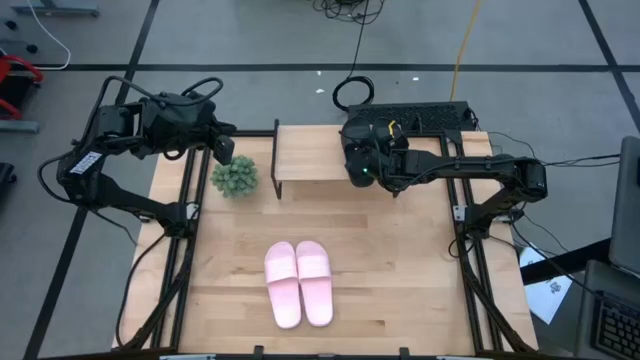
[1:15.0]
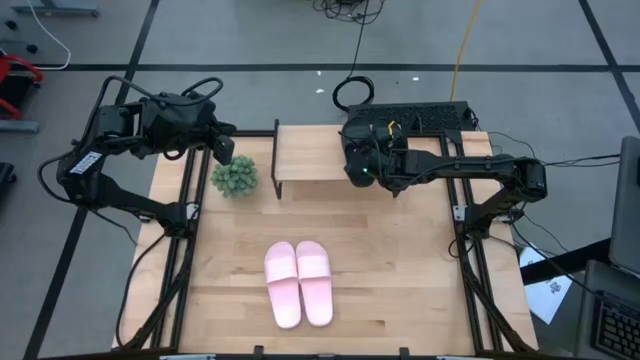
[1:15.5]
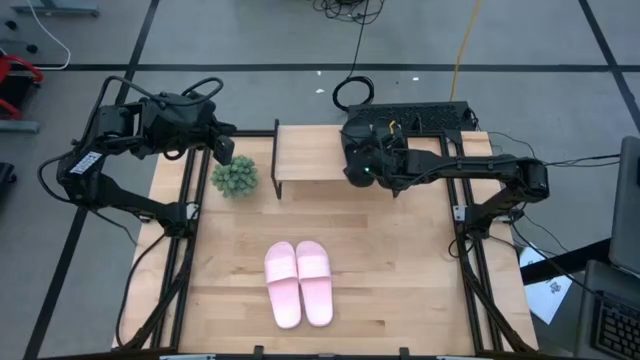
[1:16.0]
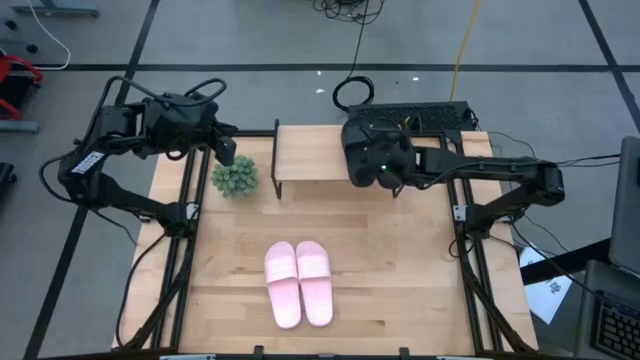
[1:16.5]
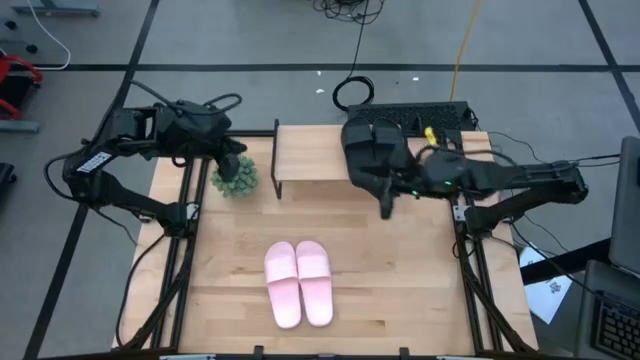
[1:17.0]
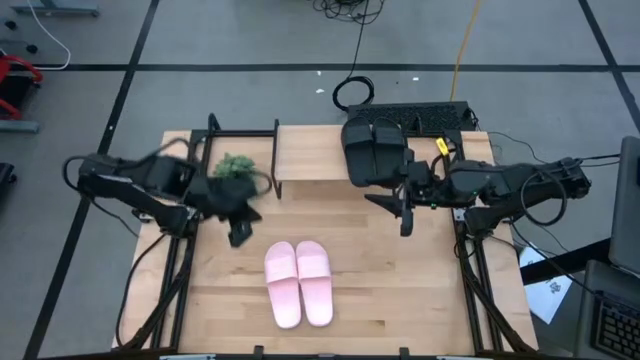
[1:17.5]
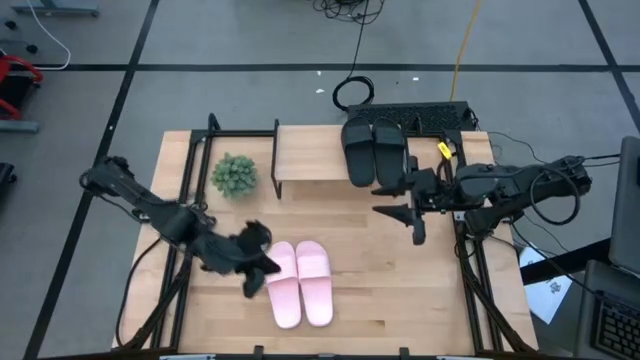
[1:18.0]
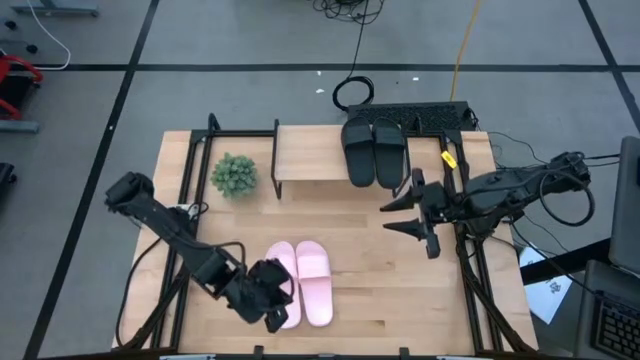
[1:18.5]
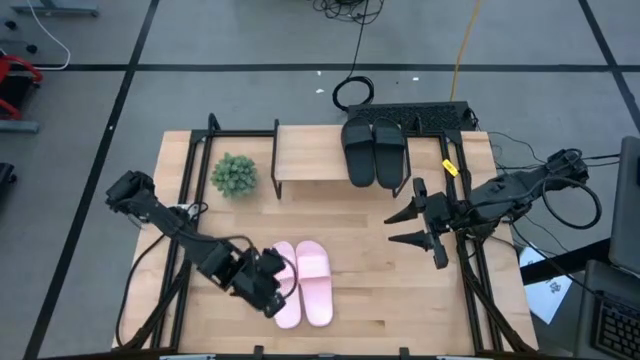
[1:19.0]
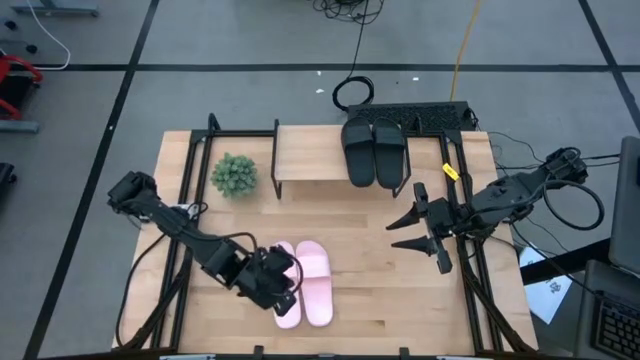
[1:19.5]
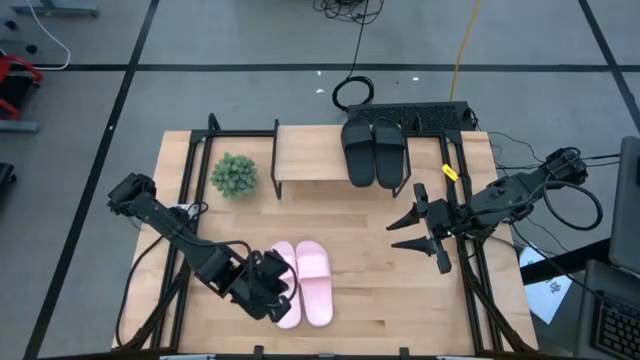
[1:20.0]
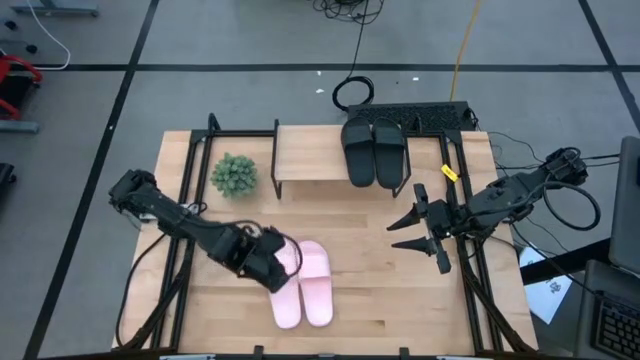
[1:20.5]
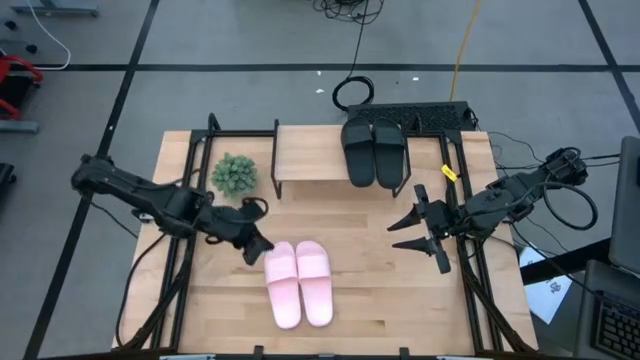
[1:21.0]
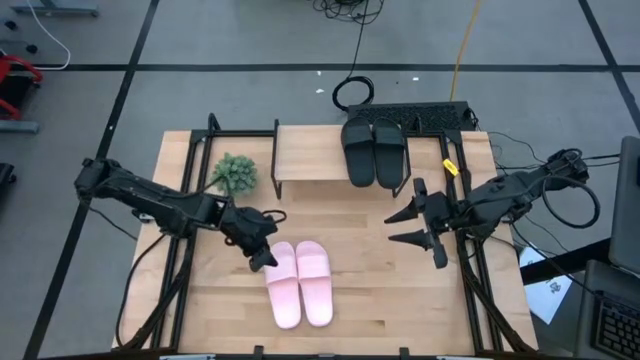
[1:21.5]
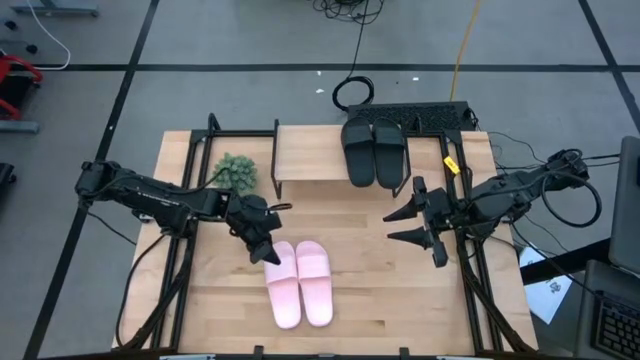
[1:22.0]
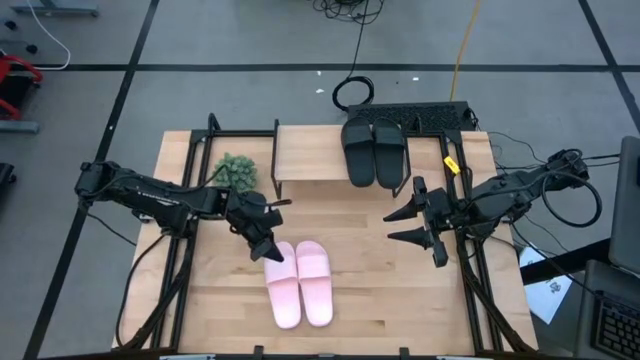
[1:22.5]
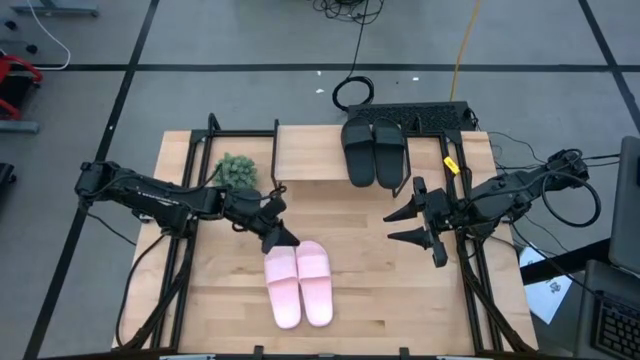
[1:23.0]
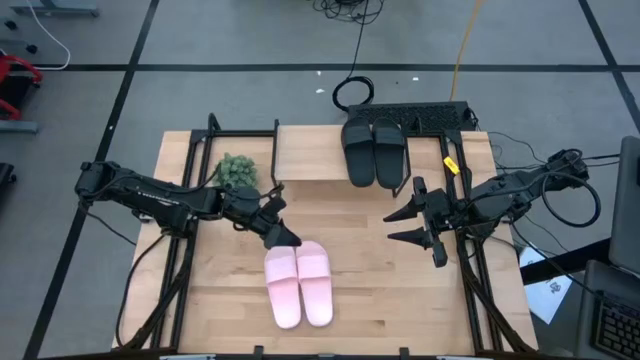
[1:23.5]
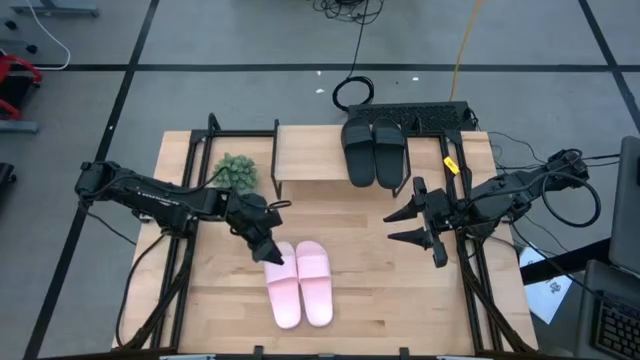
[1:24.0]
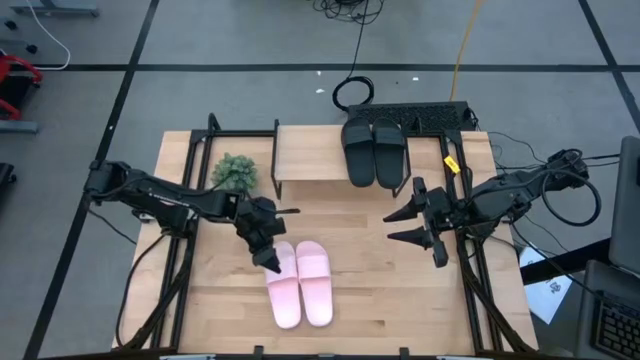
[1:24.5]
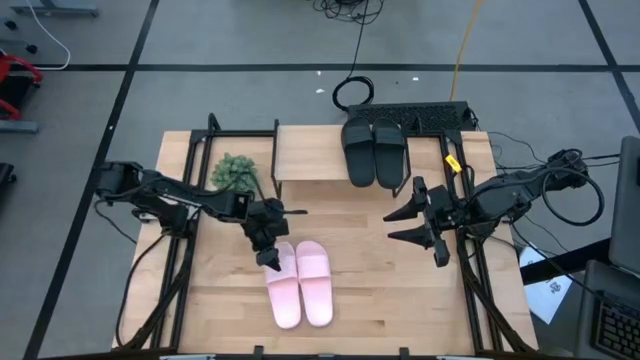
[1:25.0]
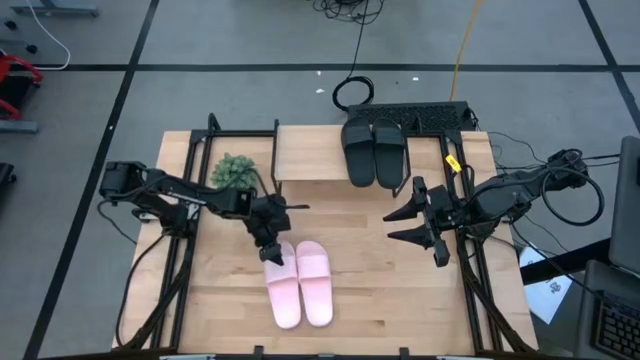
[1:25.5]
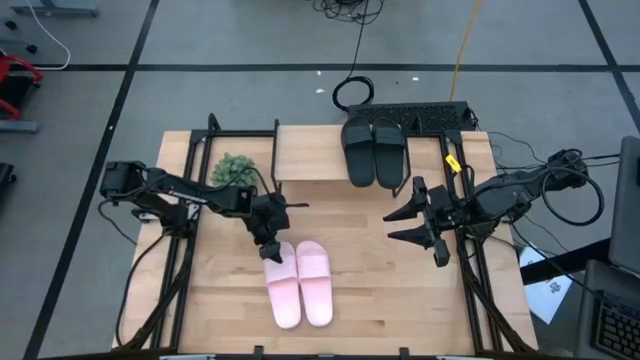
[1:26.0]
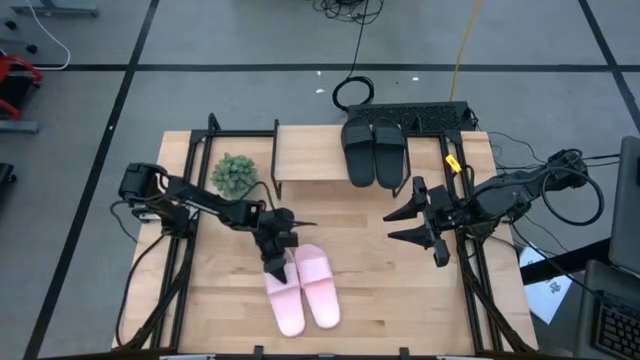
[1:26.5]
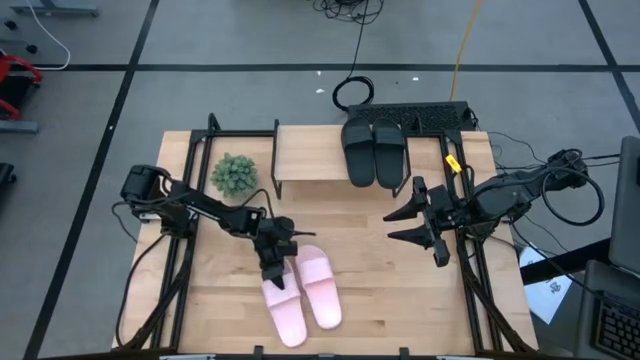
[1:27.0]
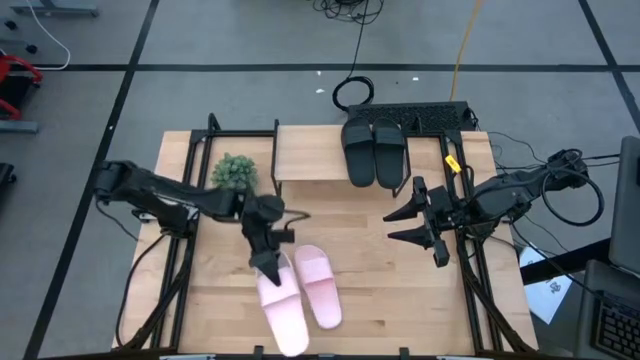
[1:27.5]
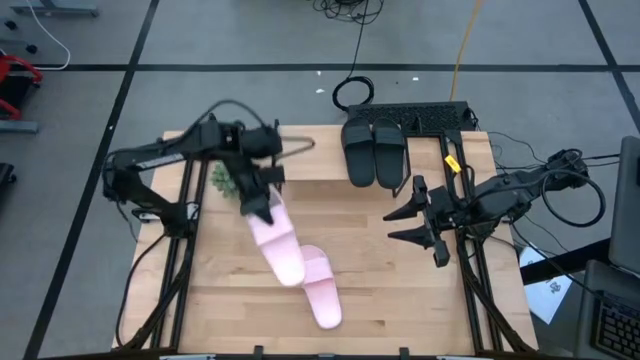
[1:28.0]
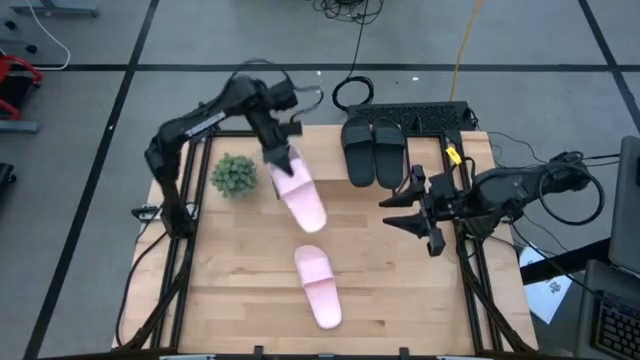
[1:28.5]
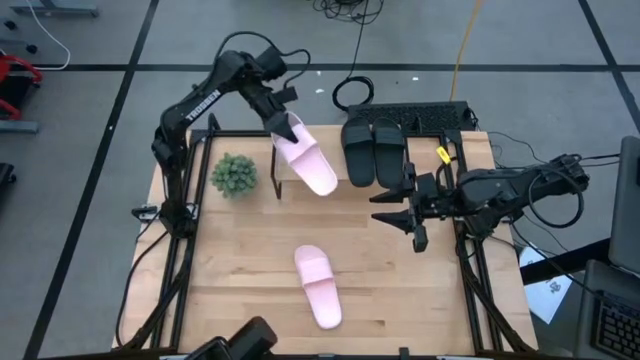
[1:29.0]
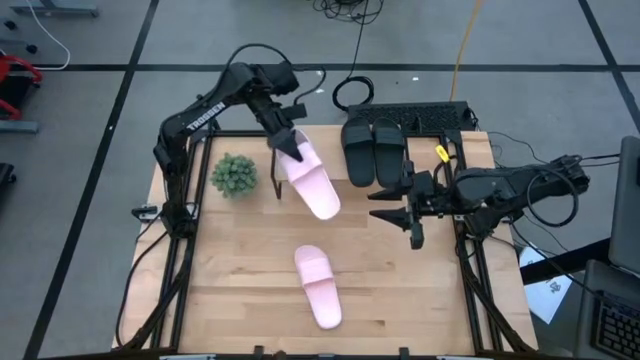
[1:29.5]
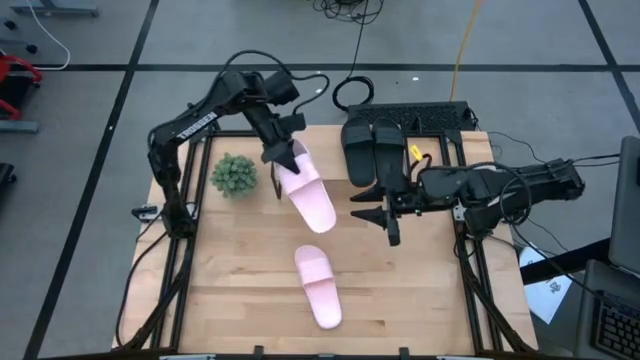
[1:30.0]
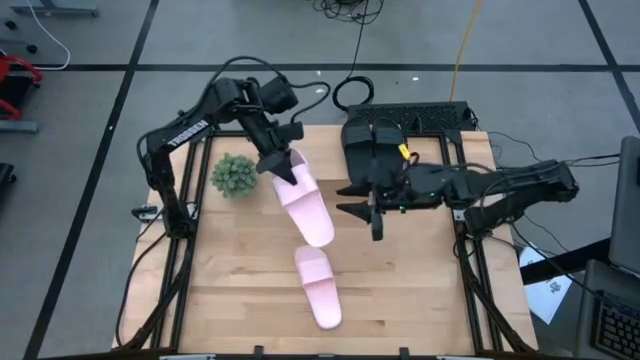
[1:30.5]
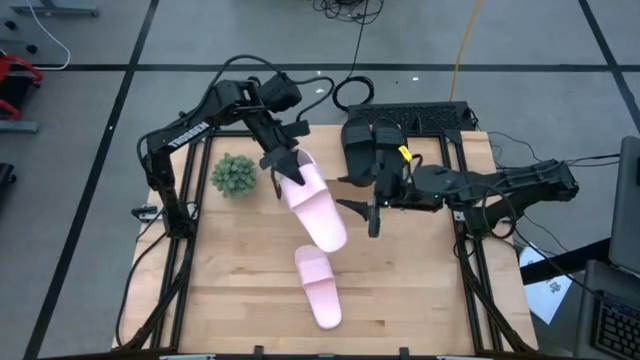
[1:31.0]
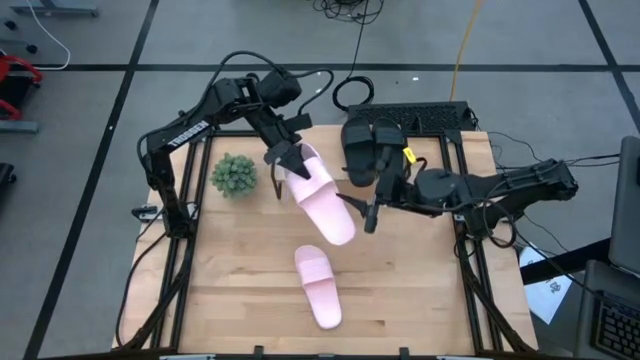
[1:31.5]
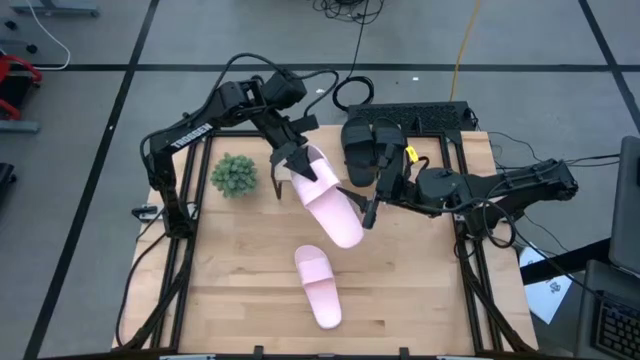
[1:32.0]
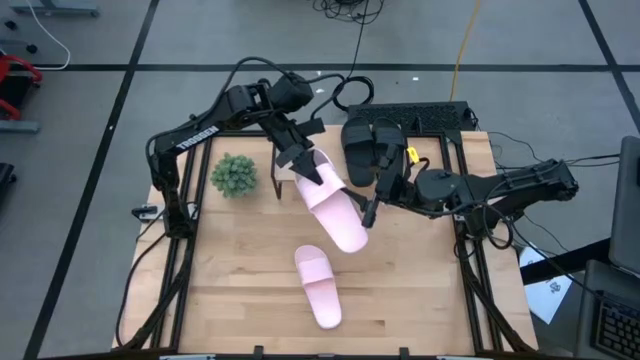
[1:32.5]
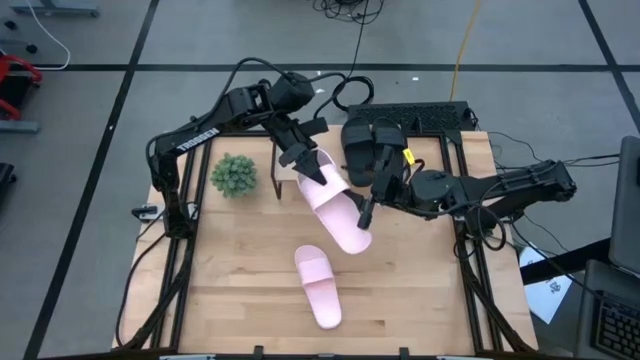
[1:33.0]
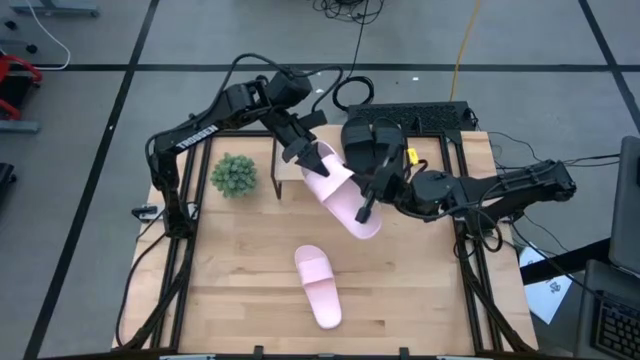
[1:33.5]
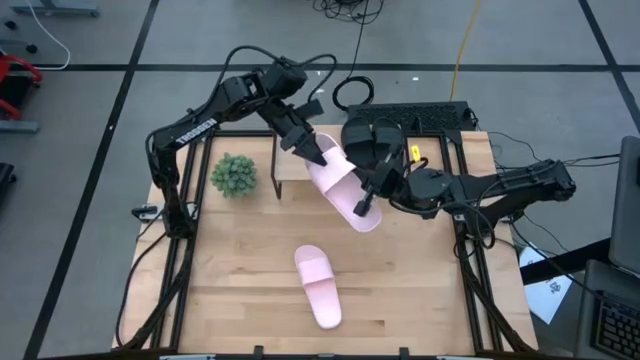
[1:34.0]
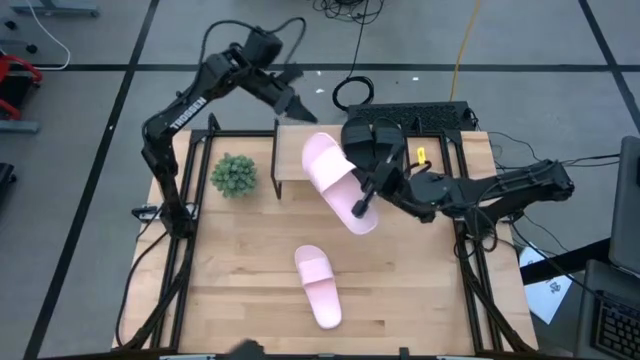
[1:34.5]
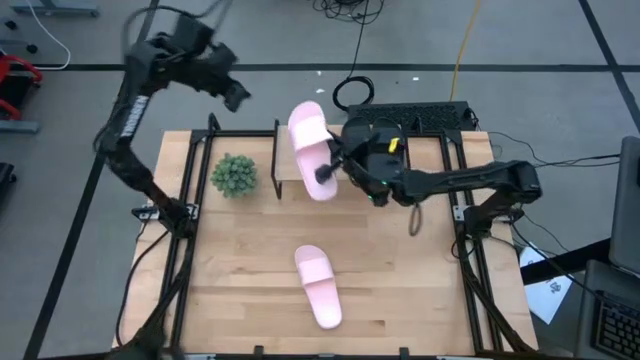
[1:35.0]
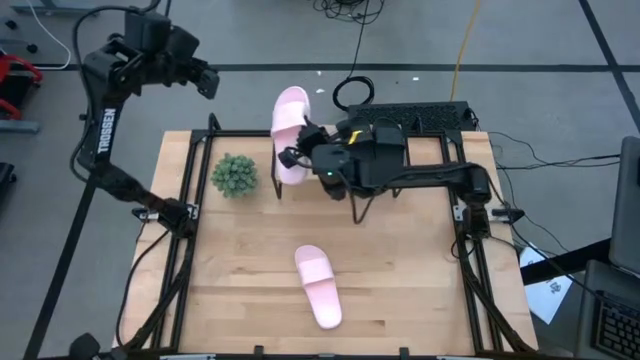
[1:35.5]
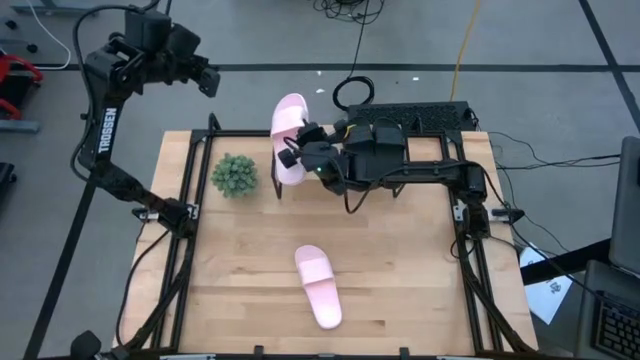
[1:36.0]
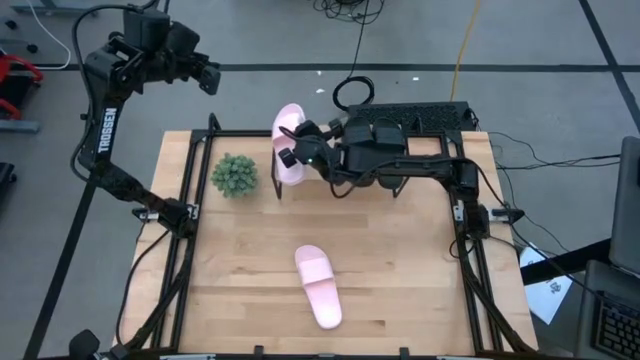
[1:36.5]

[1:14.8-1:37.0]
Task: Pick and place slides into the shelf
Put the left pink slipper on the shelf
